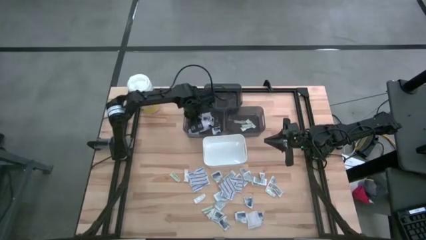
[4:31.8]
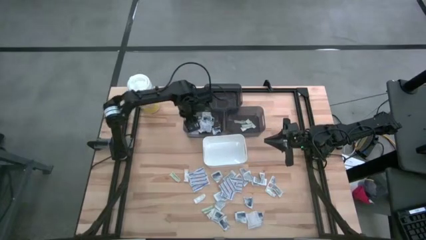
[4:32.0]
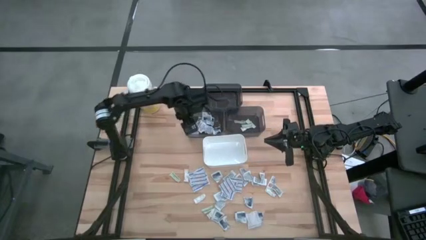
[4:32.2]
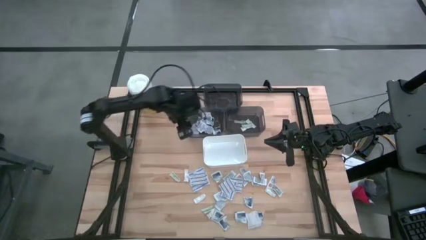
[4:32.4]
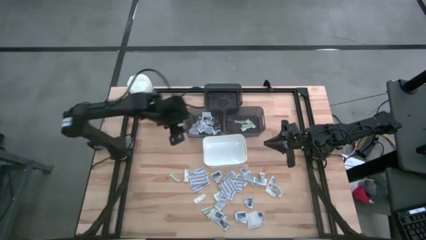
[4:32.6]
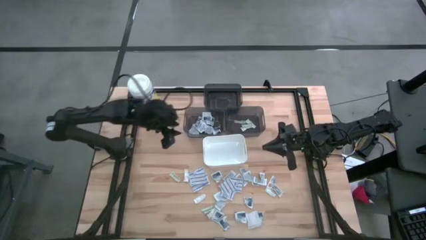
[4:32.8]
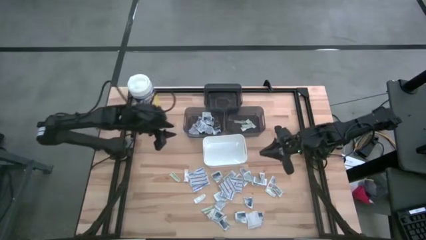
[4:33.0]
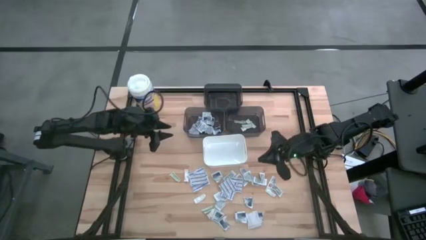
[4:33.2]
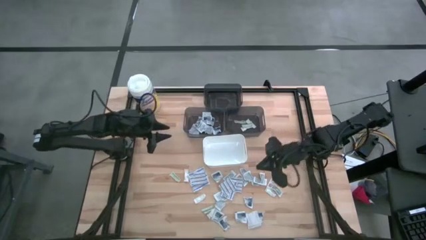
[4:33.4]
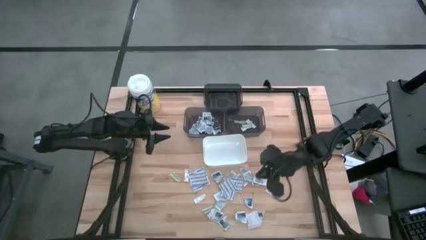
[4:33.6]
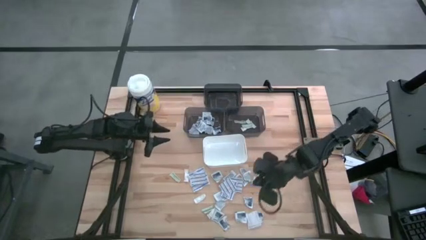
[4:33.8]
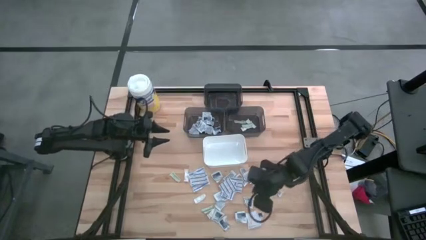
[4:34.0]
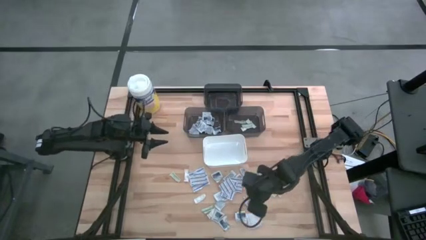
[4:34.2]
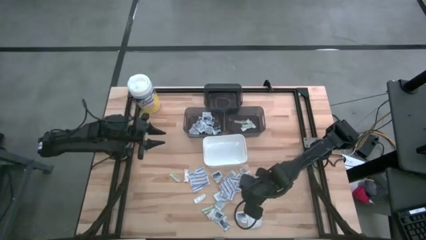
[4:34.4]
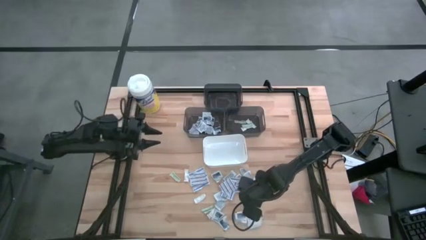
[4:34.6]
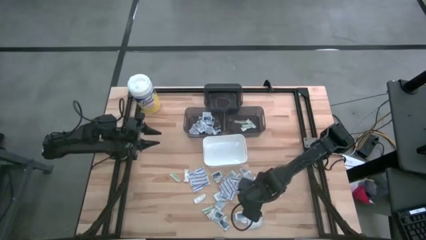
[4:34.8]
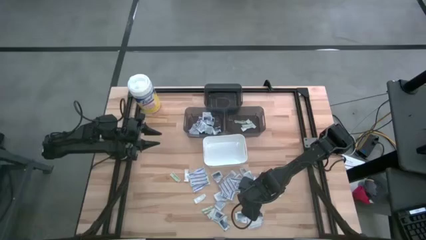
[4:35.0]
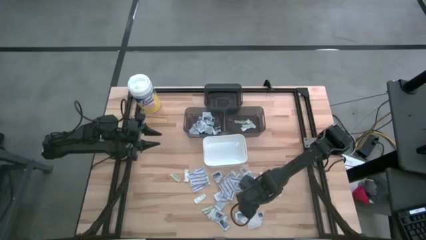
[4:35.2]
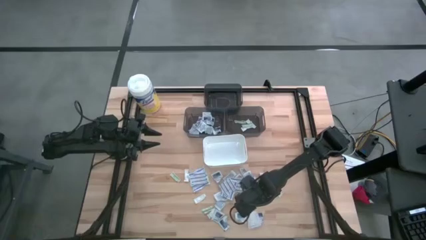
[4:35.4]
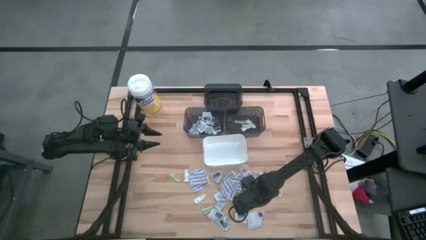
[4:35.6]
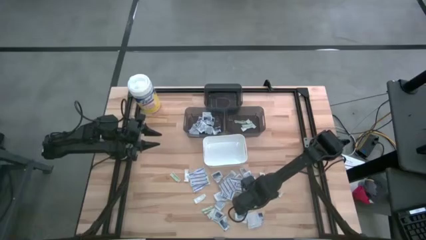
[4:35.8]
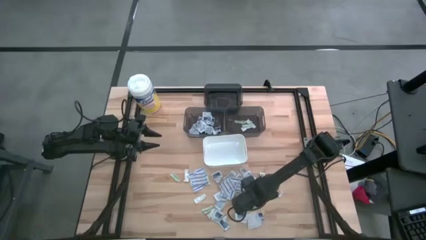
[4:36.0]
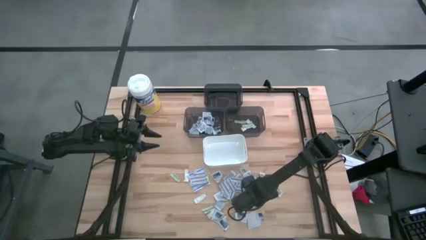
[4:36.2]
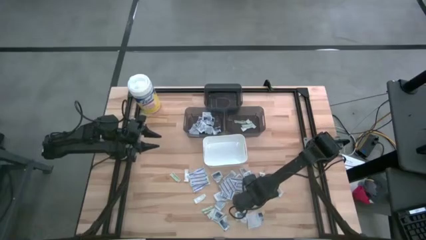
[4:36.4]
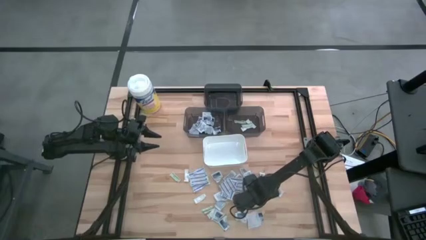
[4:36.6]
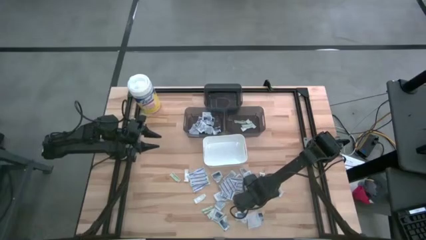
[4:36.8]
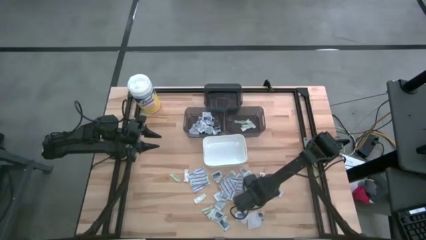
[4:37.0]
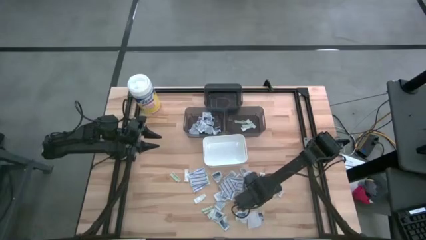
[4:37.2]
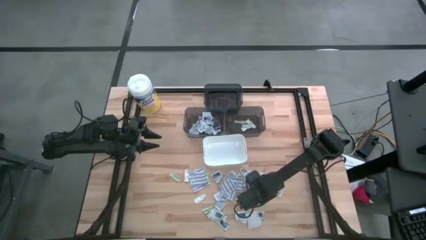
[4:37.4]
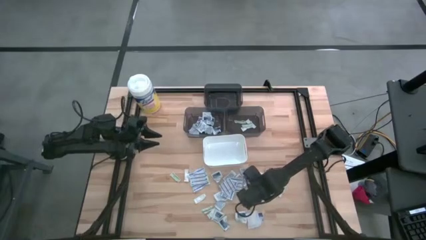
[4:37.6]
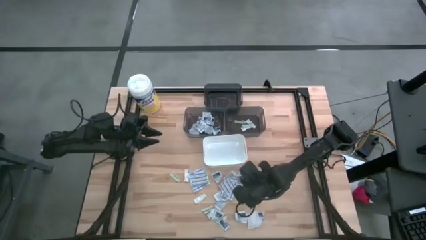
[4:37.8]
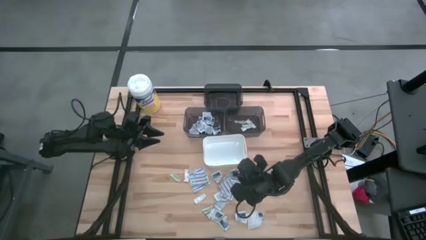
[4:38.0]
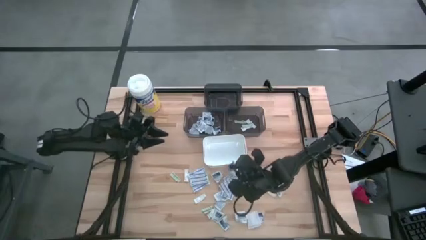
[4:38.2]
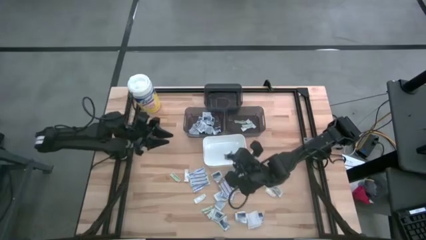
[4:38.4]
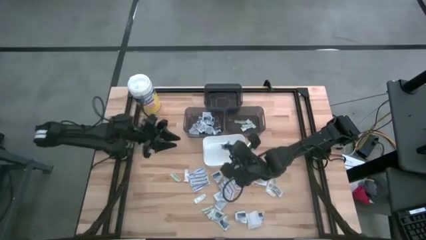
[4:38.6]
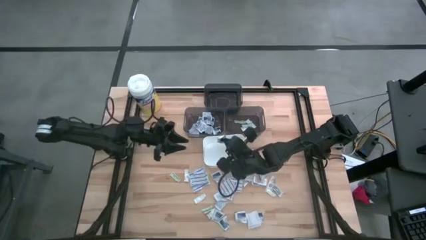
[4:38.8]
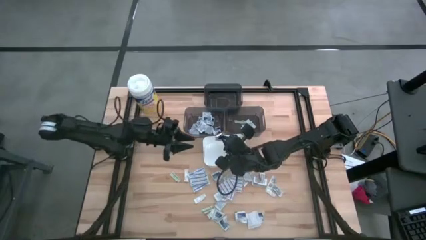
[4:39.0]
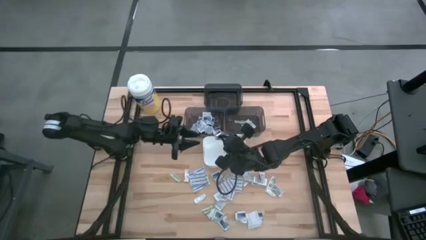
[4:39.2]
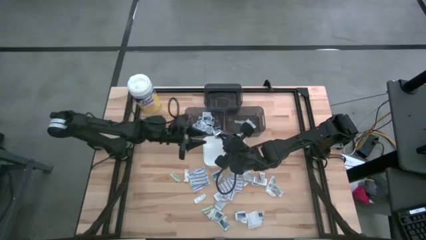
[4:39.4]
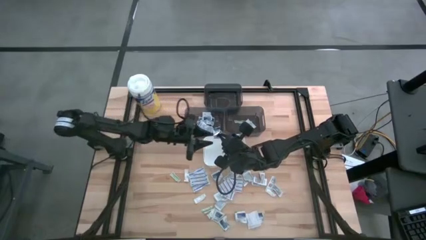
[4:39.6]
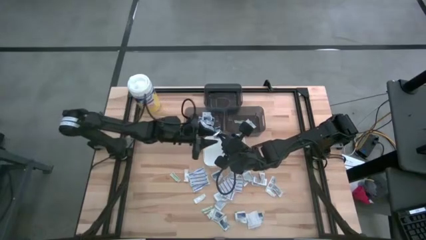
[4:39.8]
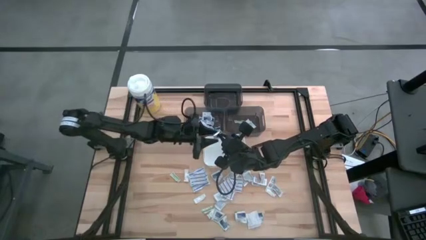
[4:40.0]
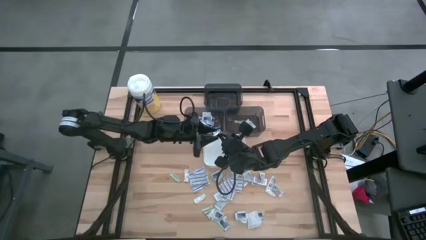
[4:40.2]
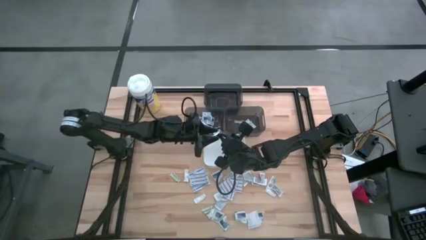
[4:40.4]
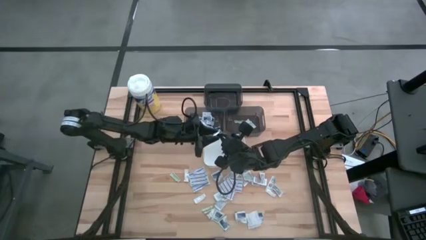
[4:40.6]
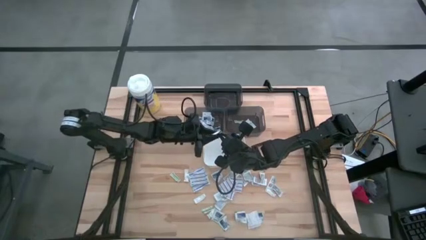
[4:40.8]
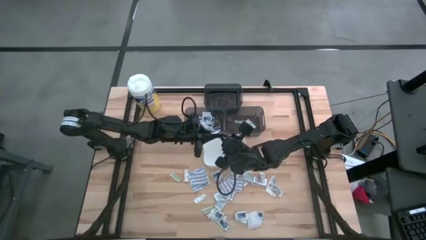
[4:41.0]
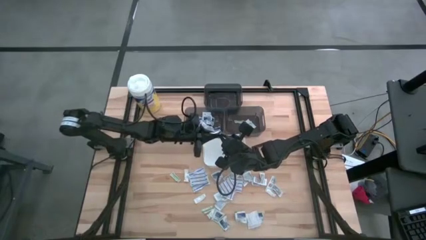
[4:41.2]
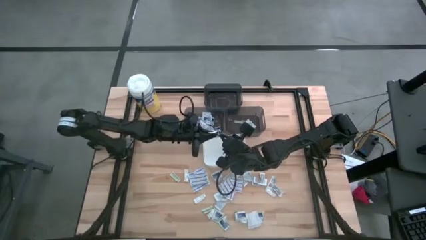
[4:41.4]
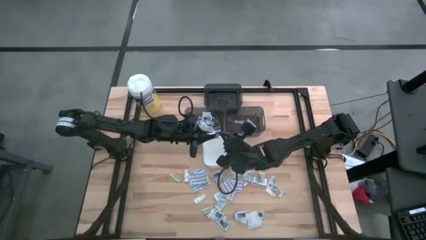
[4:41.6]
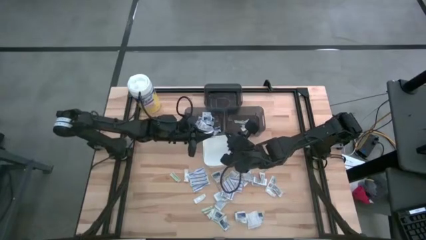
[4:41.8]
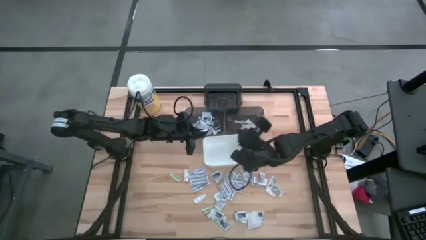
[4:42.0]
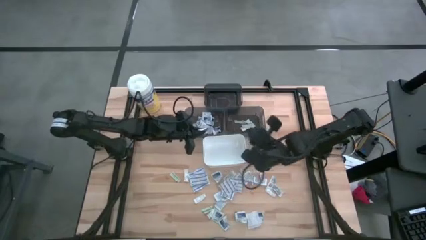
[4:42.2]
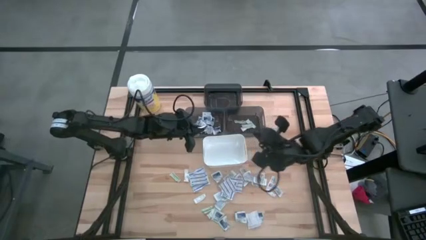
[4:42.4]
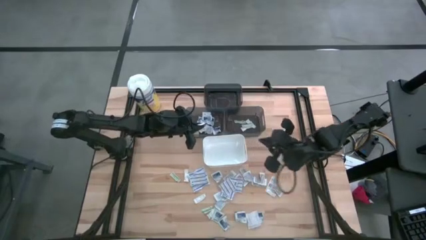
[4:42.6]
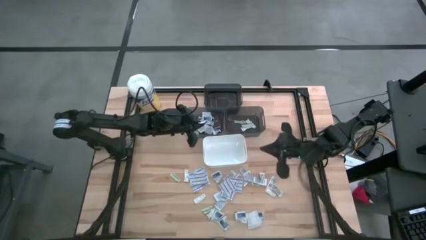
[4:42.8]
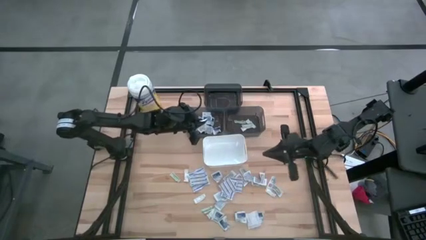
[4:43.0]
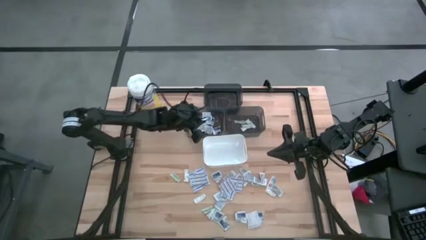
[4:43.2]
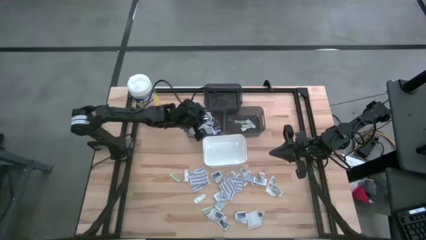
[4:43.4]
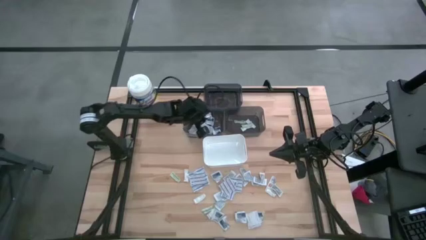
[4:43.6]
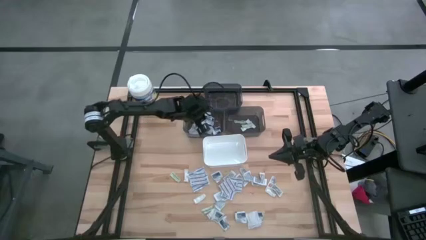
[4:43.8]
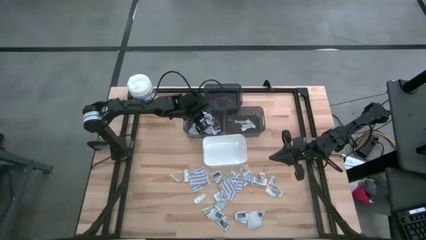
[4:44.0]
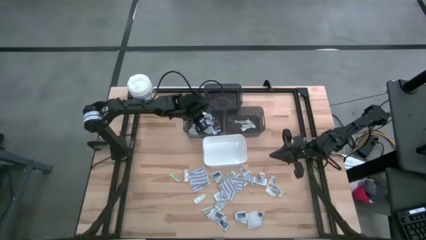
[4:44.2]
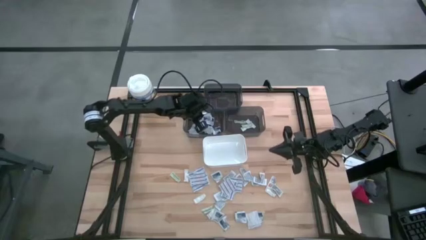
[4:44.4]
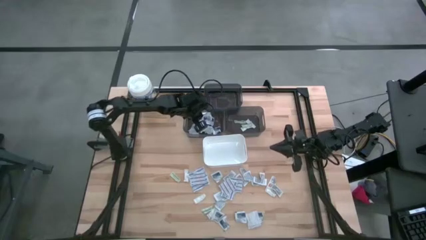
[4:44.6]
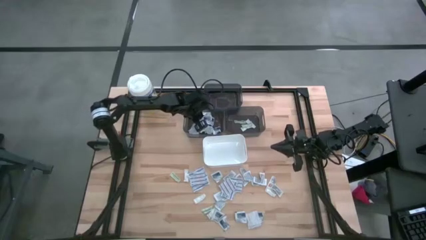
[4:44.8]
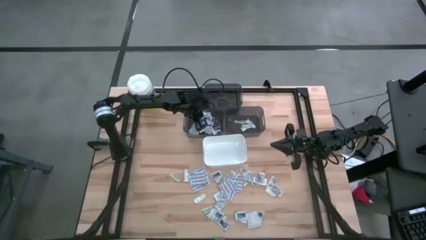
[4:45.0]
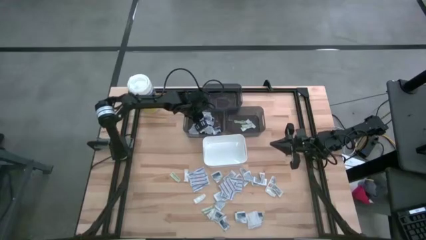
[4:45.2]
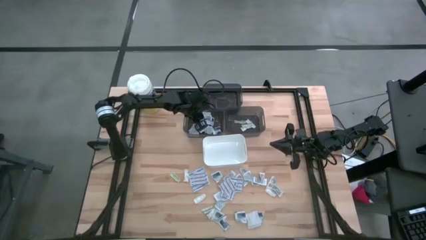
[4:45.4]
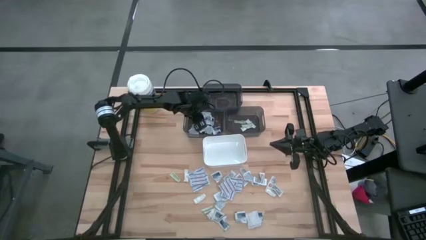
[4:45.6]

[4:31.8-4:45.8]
Task: Pick & Place First Aid Supplies
Put the alcohol pad into the bottom left black bin
